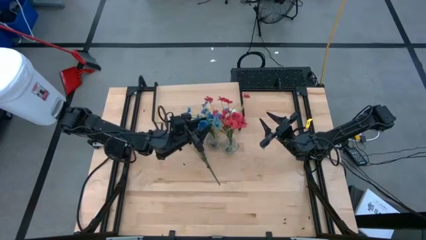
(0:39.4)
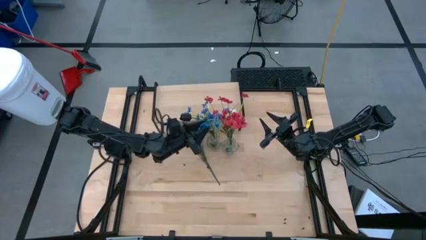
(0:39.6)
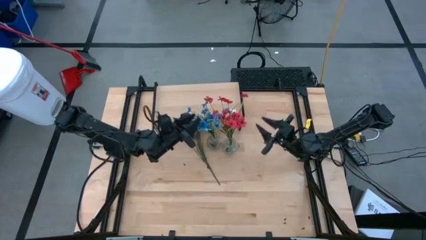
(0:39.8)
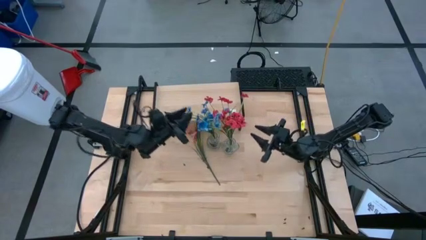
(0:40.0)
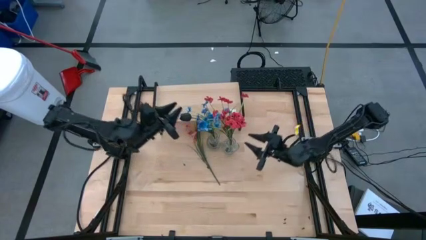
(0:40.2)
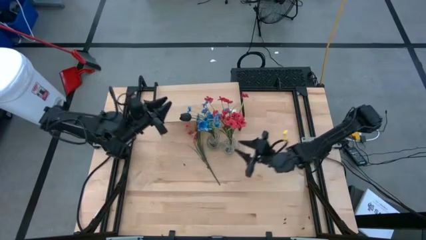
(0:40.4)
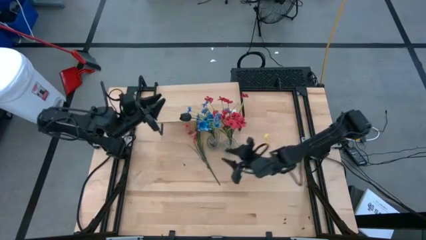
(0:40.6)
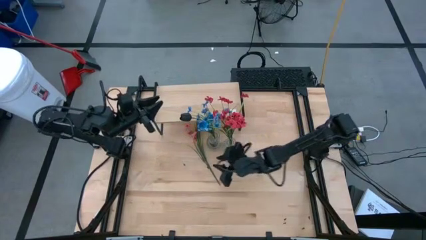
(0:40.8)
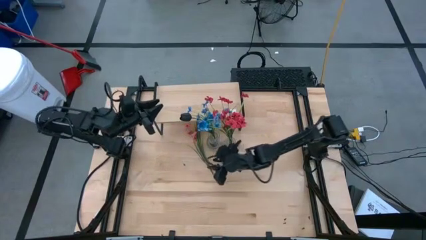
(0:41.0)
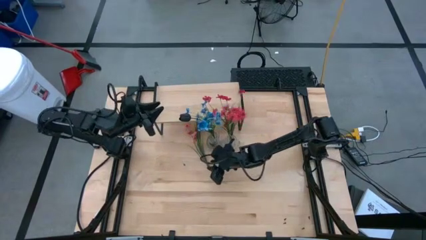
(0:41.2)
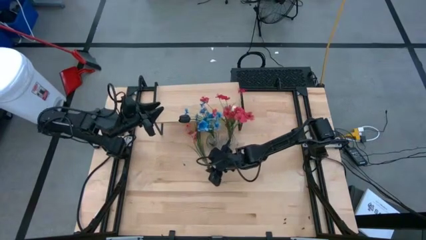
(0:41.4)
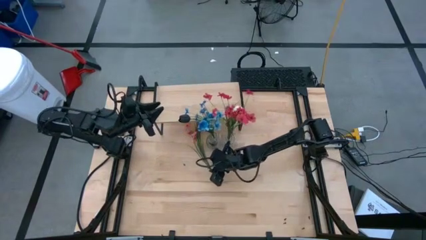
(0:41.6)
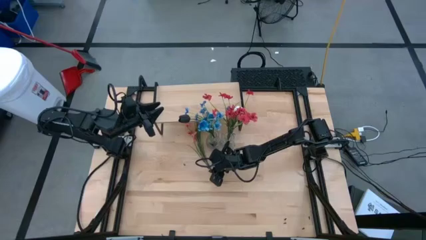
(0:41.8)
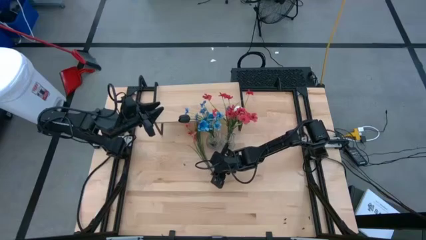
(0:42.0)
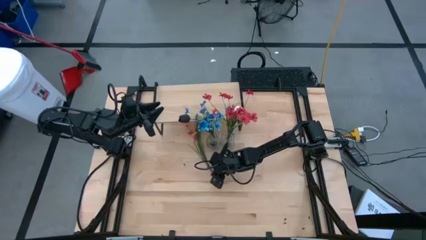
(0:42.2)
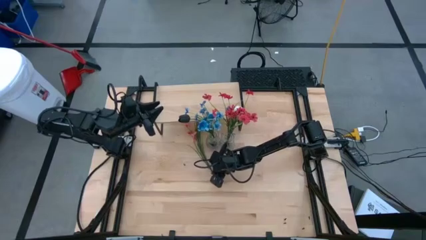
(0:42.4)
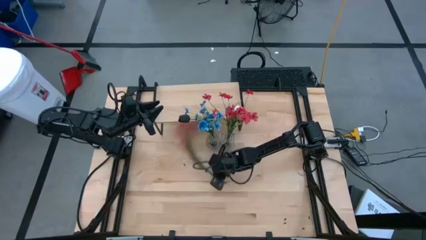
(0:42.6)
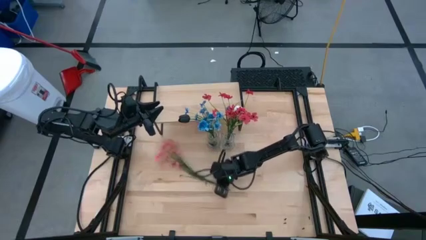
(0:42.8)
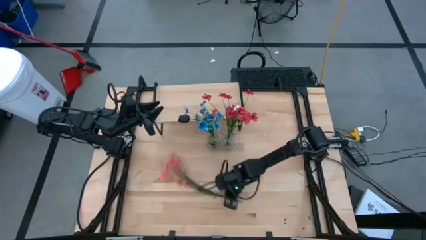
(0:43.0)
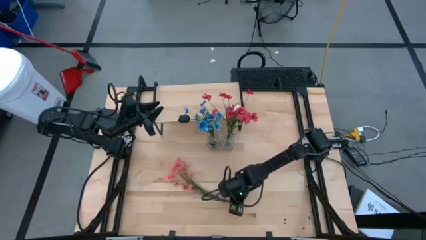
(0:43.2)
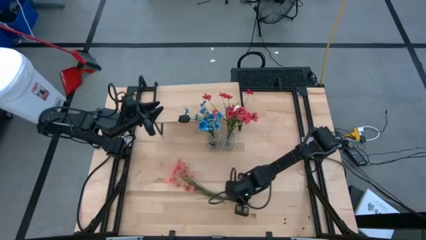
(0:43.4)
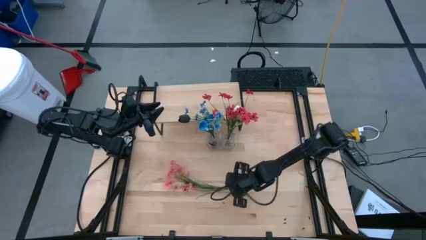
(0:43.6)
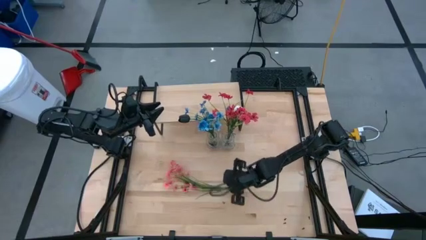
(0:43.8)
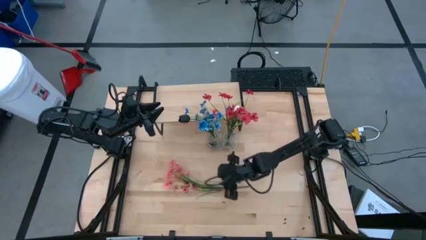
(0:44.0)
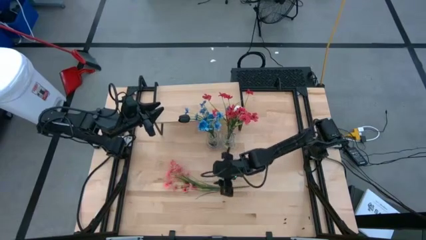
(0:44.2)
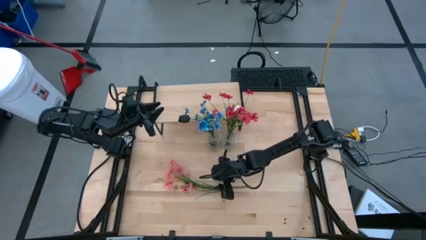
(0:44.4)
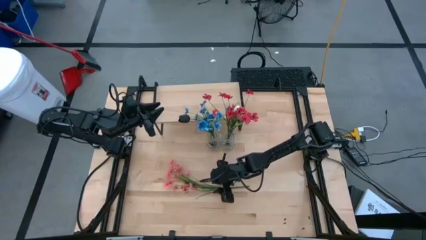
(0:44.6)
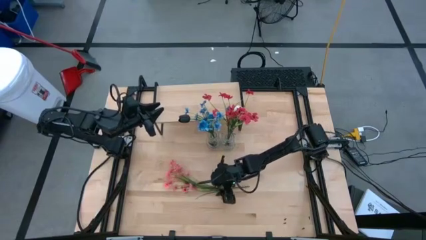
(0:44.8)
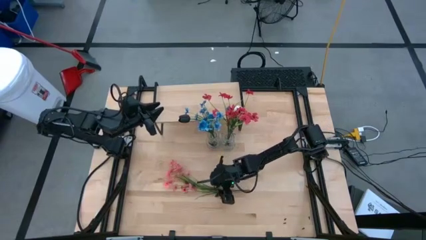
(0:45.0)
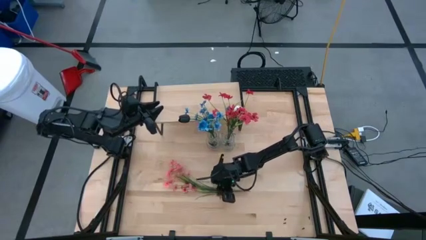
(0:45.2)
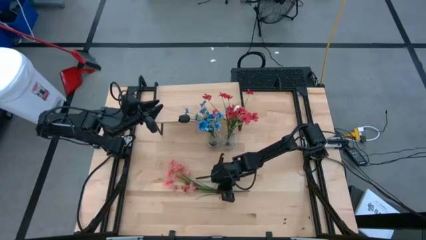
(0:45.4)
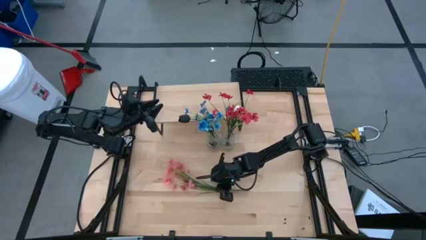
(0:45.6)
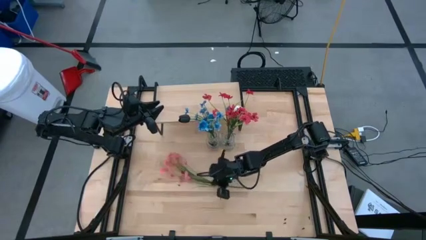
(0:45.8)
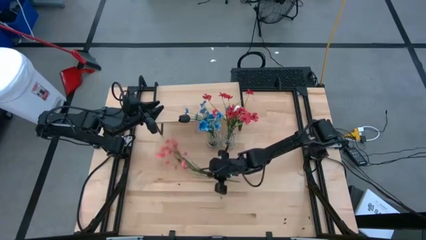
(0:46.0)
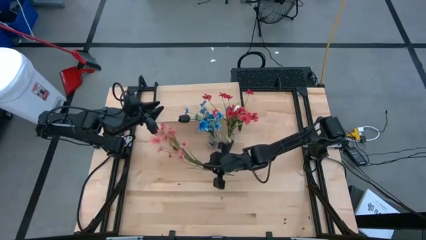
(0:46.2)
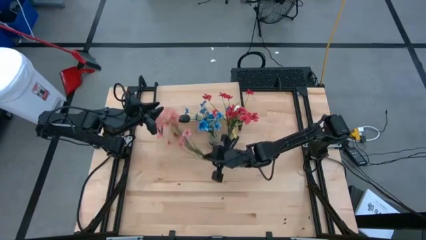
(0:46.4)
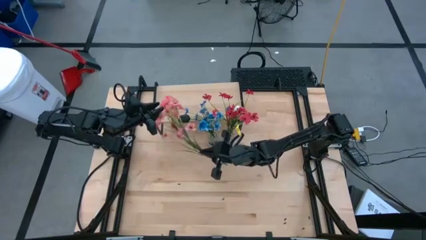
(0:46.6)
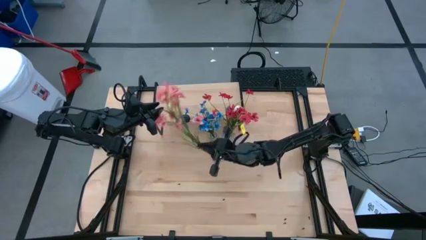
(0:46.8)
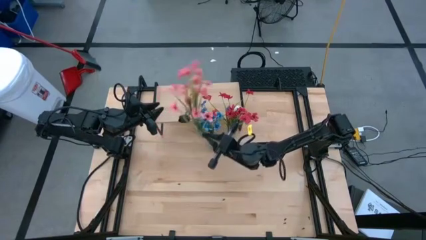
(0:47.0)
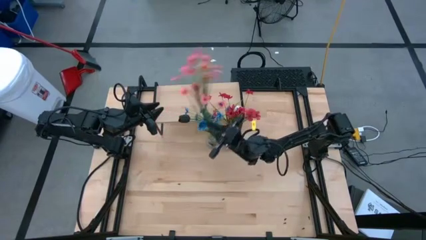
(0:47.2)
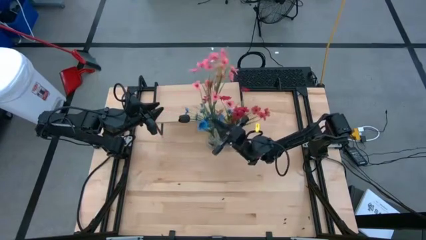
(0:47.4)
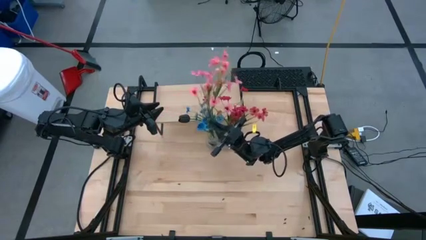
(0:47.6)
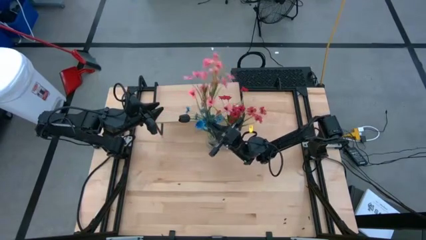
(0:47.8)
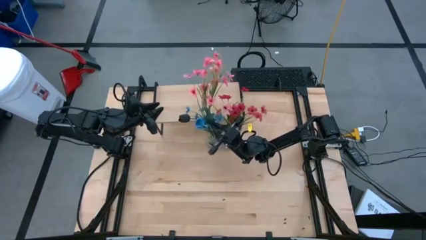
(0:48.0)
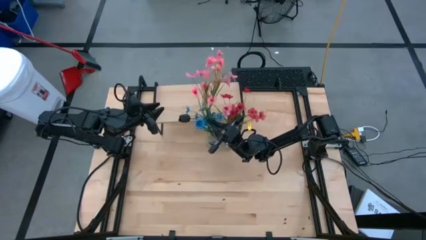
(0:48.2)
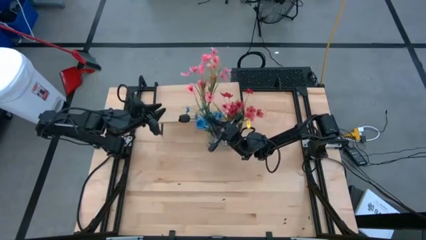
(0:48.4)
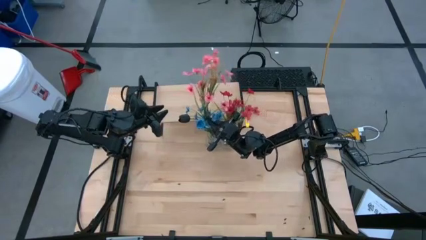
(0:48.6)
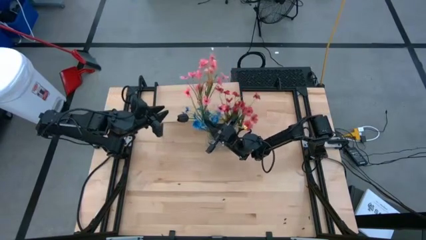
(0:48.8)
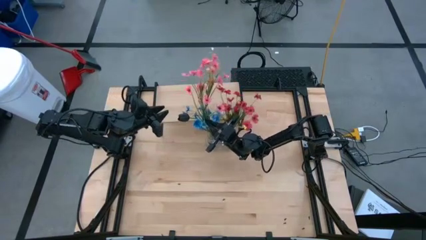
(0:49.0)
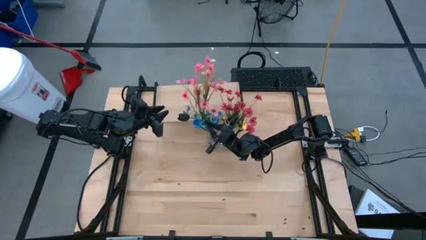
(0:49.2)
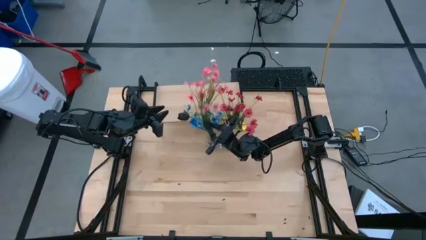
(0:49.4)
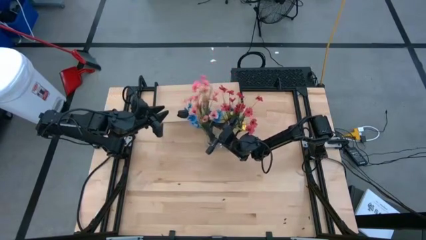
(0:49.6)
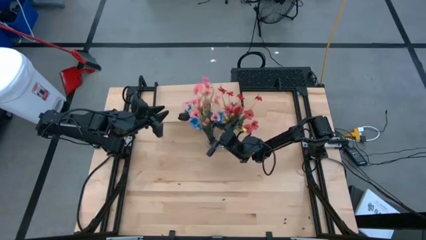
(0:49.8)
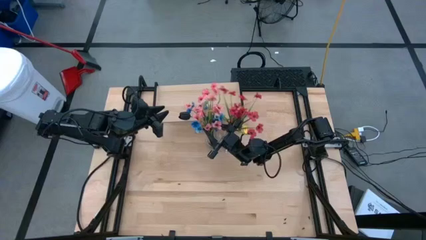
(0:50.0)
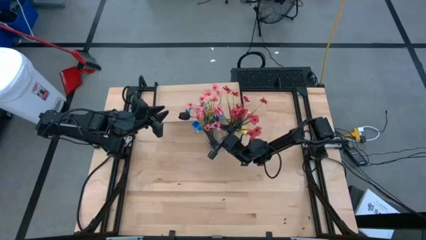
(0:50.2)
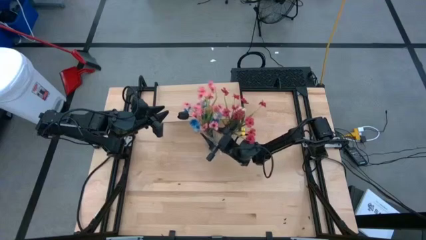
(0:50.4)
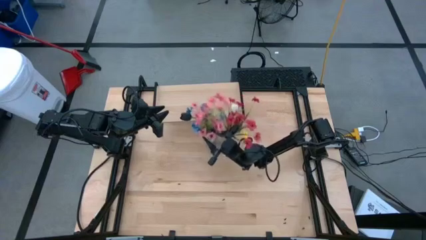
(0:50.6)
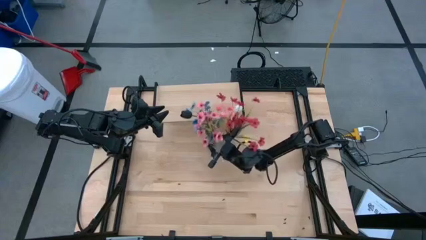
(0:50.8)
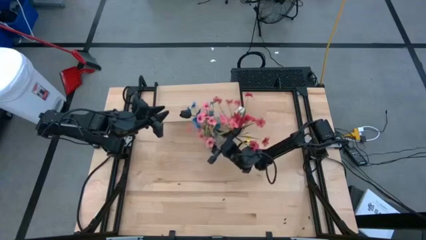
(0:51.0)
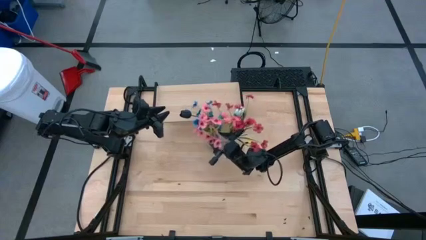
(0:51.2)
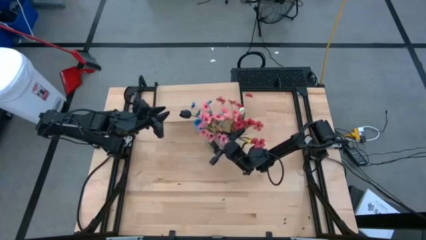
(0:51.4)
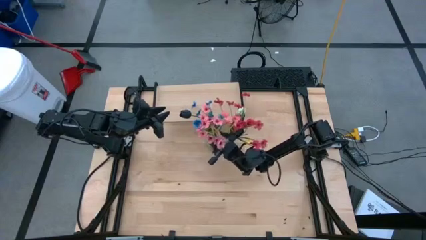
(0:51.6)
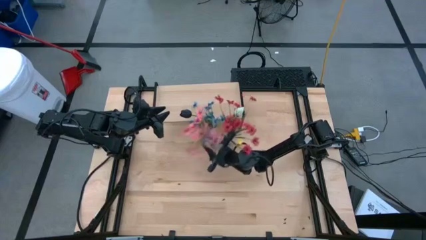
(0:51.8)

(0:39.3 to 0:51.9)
Task: Pick and place flowers into a vace then onto a shelf
Put the pink flowers into the left transparent vase

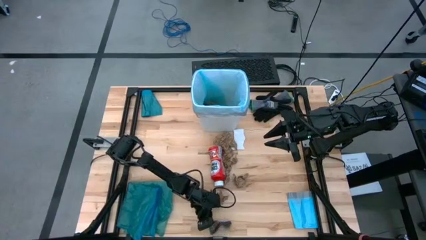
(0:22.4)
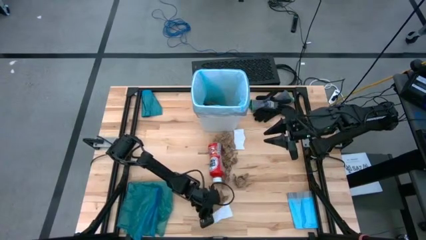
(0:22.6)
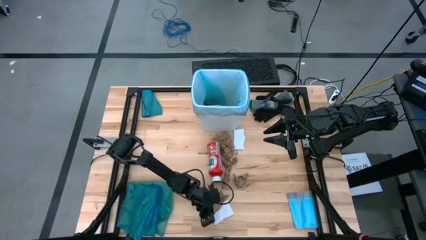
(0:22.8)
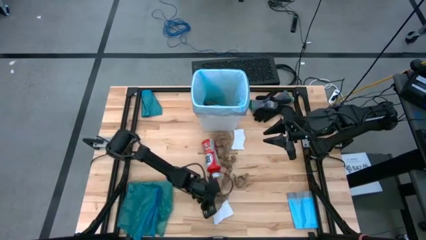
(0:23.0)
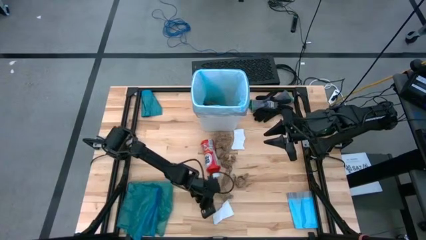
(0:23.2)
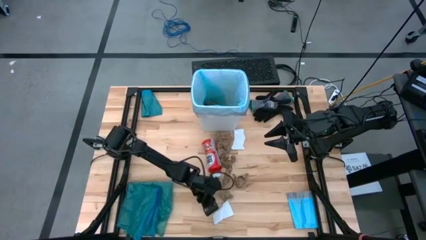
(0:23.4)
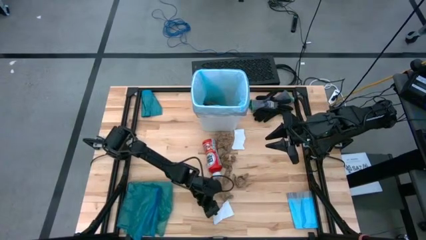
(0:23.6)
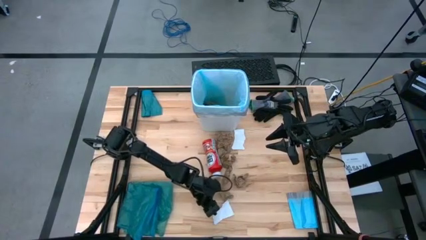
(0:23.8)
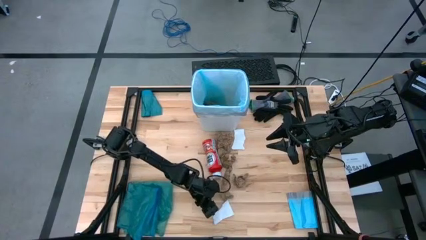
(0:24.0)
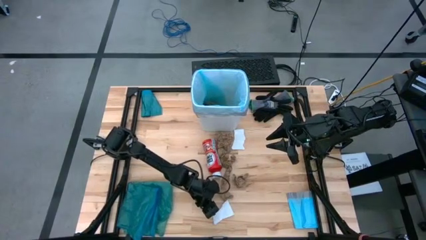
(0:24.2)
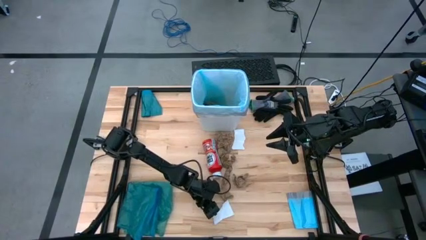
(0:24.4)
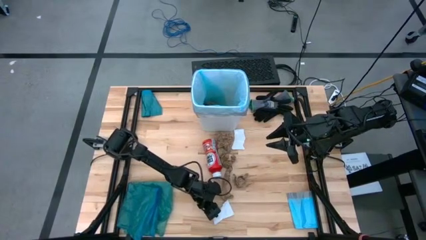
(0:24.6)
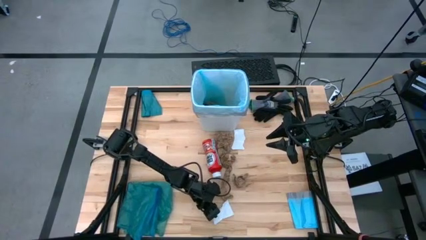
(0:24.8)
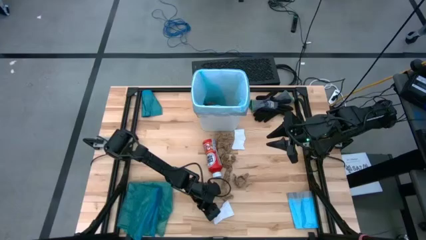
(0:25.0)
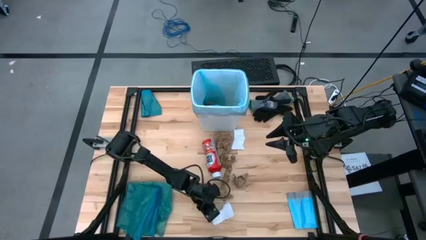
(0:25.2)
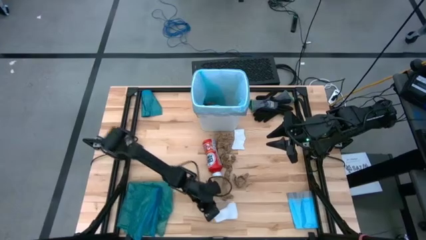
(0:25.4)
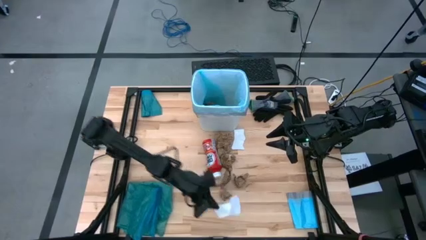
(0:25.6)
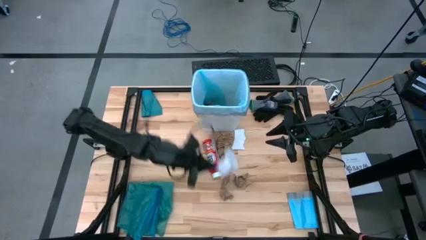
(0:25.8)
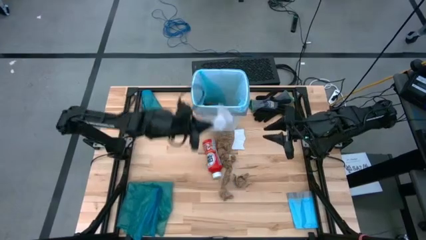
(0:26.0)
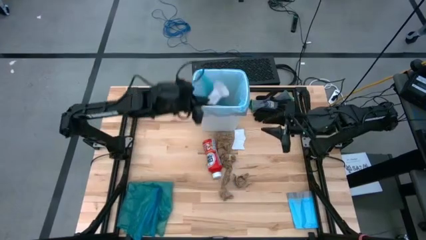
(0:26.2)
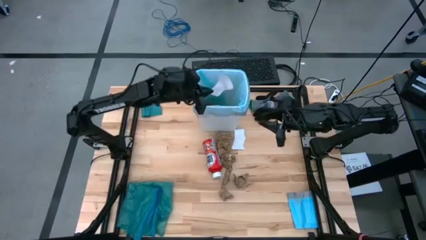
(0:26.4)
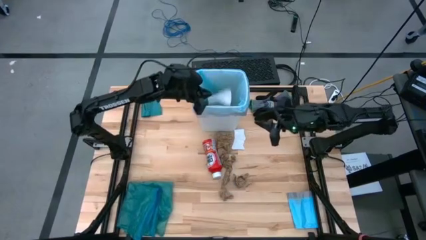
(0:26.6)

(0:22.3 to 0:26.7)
Task: place trash/remove bag and relplace
Put the white paper into the white trash bin
